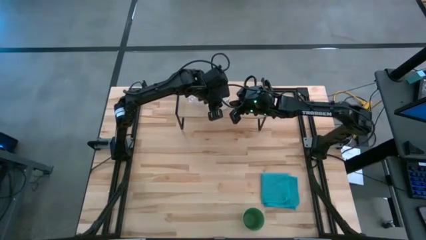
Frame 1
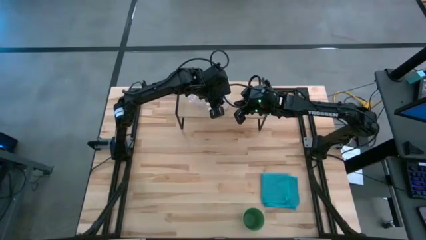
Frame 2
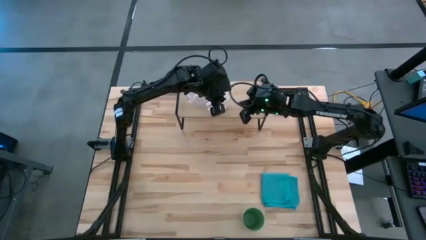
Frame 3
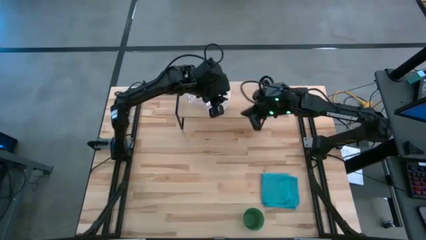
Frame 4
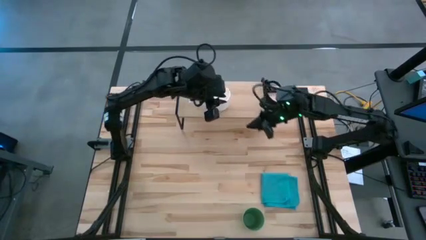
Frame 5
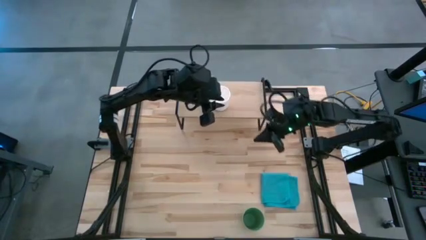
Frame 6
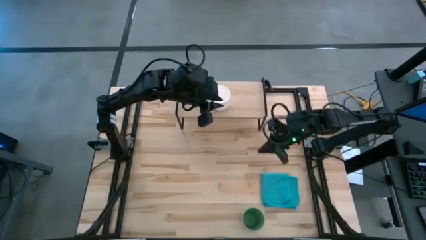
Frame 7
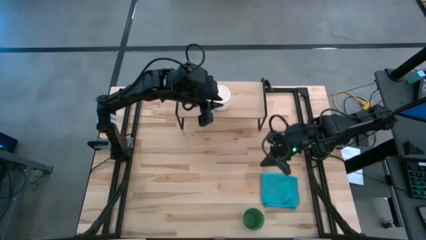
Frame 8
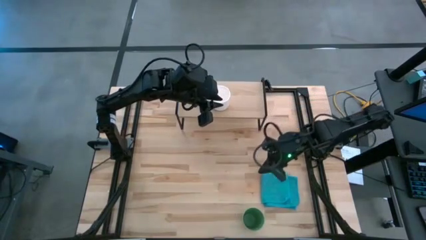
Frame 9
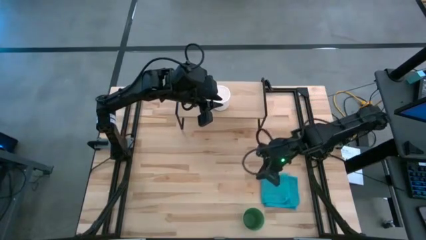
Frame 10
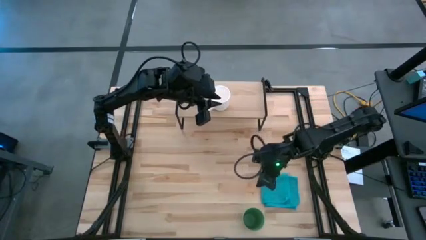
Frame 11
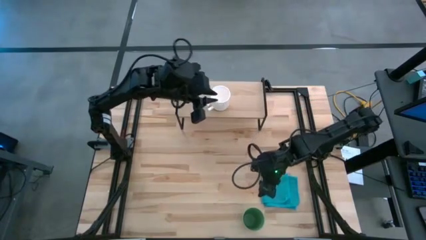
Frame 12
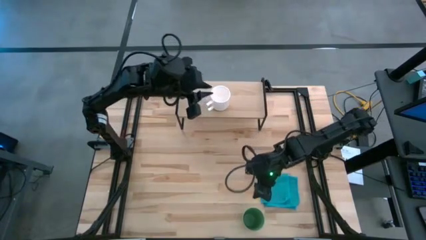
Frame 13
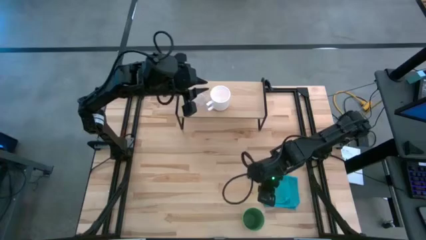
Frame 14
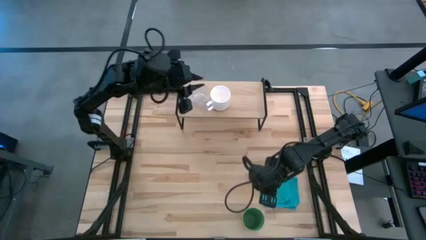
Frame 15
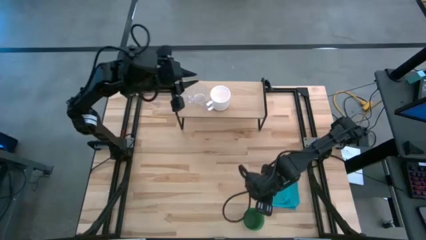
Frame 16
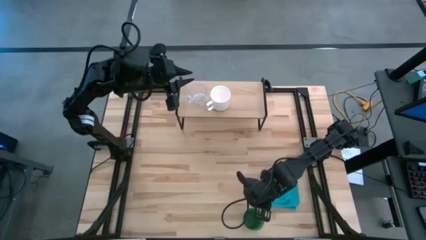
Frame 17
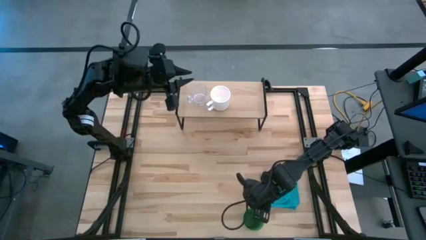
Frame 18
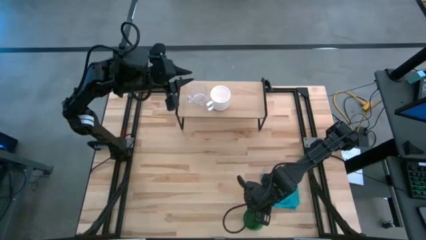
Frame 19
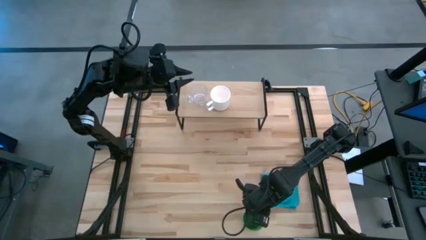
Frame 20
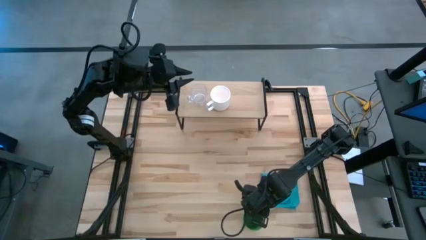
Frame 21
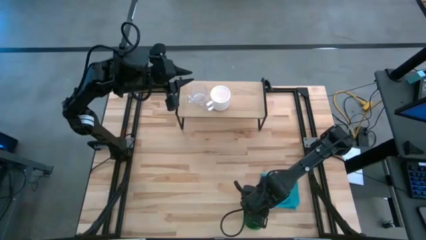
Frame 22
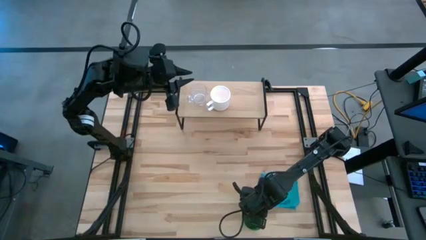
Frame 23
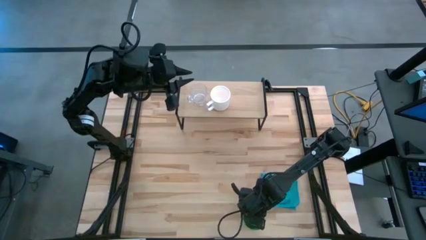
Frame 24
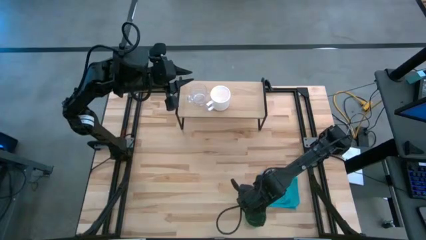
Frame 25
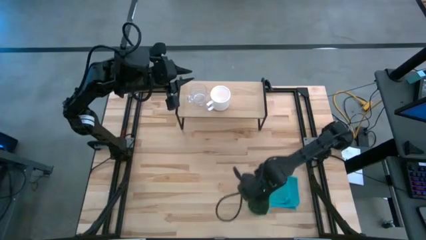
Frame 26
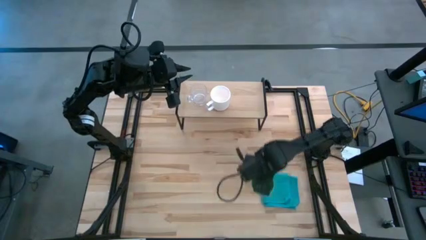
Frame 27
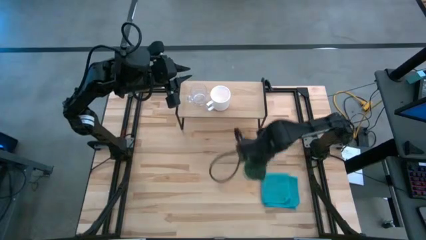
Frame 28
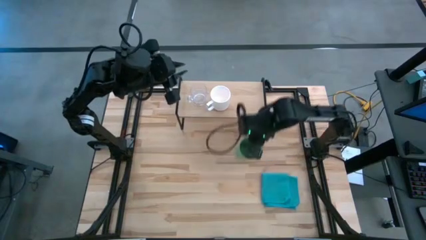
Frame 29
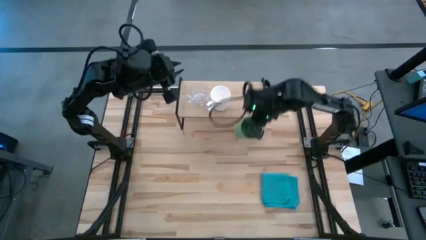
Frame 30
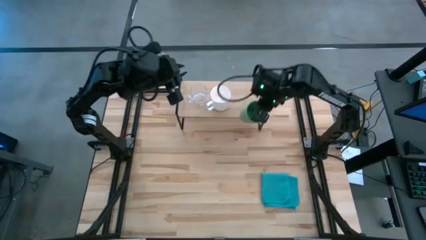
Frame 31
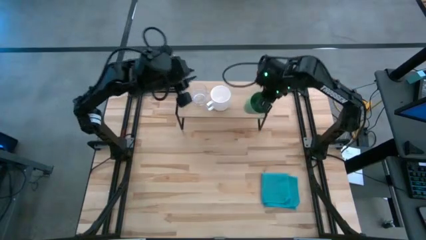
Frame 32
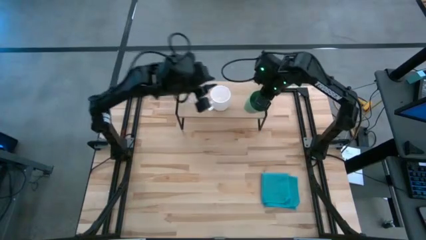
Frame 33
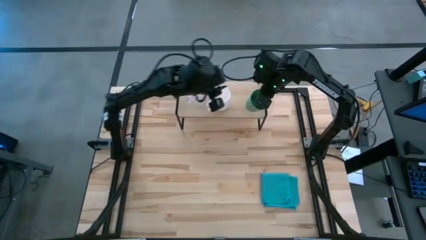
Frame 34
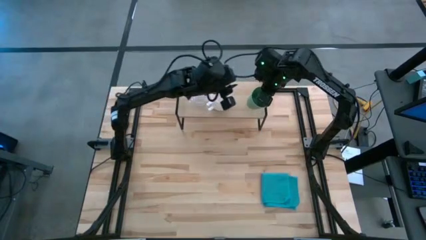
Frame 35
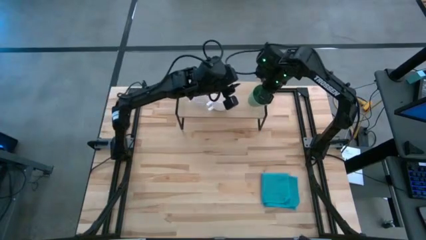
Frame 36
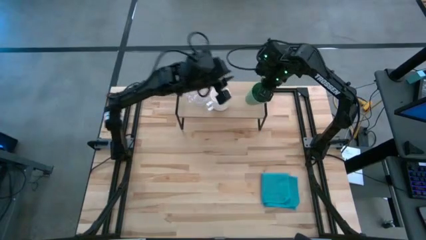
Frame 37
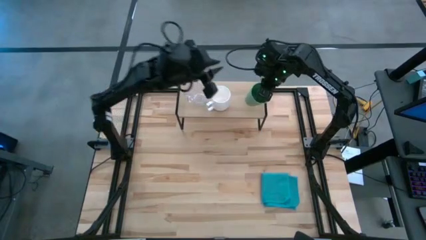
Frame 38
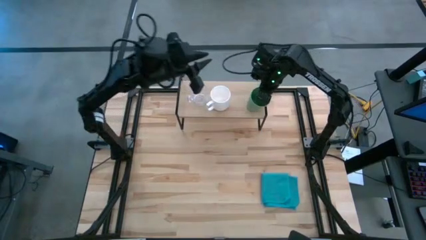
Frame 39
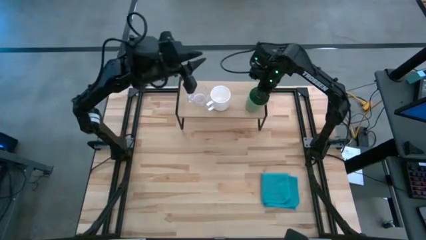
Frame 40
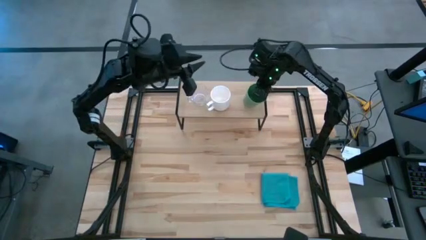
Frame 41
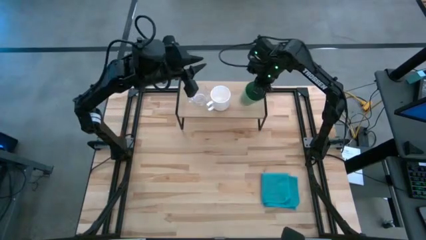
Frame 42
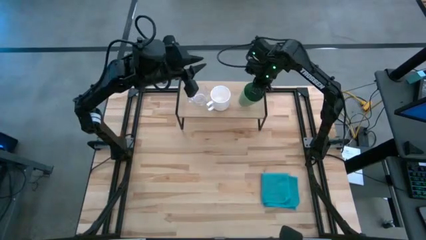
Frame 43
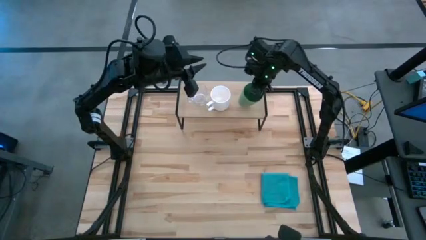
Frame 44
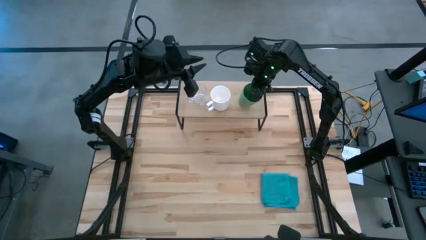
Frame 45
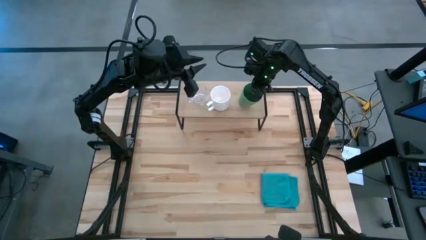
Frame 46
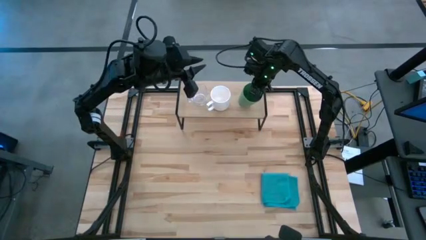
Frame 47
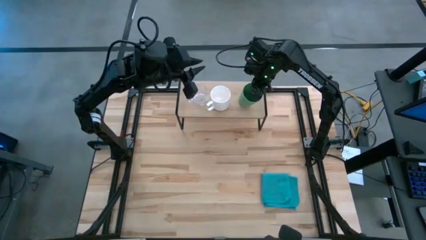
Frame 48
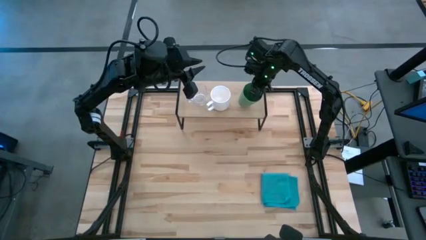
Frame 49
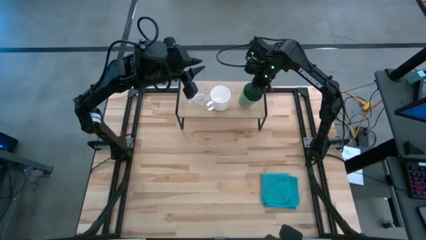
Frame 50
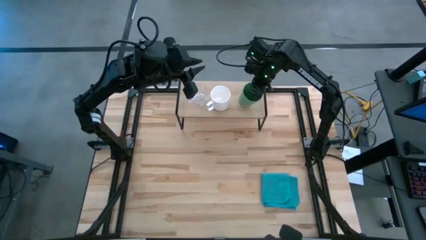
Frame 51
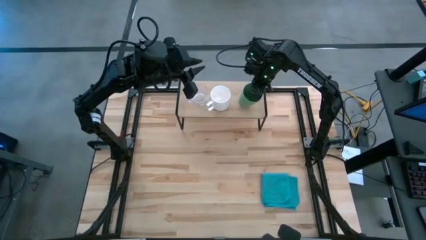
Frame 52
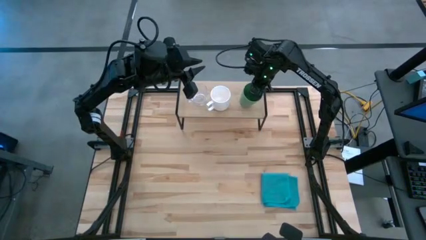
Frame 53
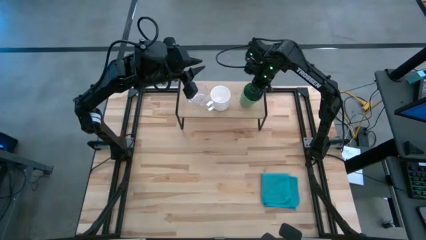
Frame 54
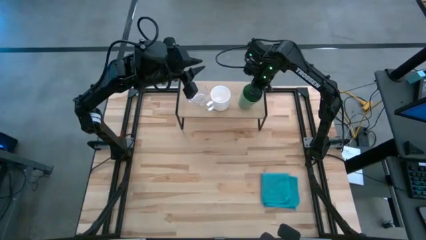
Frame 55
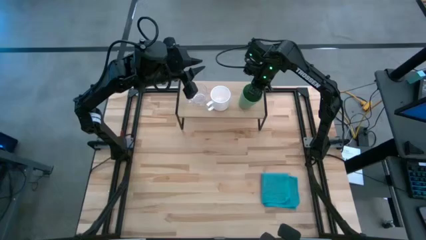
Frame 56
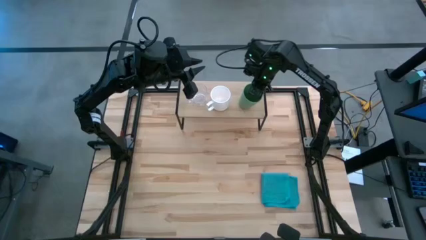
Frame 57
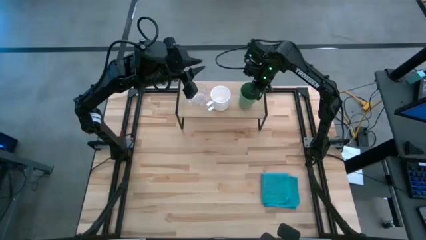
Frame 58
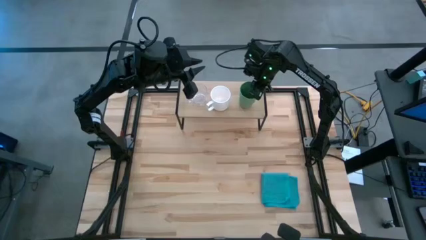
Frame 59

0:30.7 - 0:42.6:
Task: Stack small to large cups/mugs on shelf
Put the green cup on the shelf

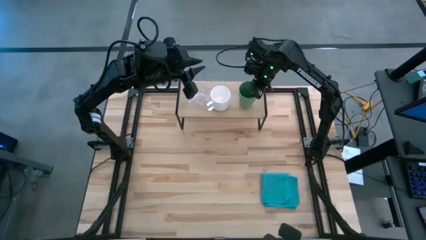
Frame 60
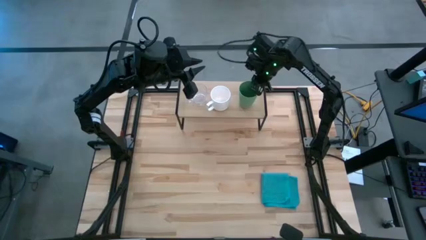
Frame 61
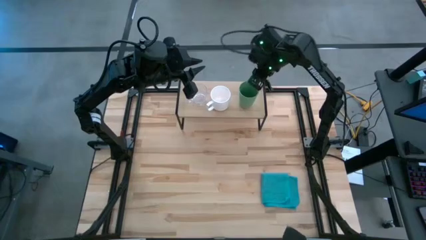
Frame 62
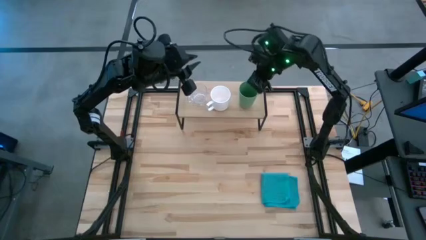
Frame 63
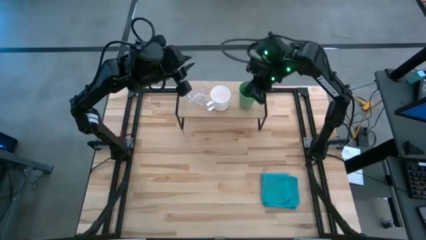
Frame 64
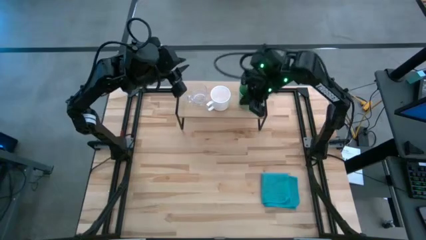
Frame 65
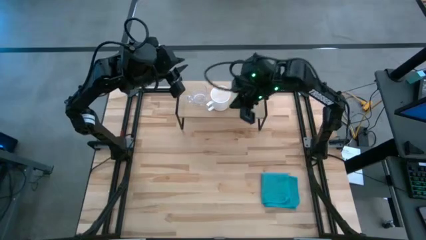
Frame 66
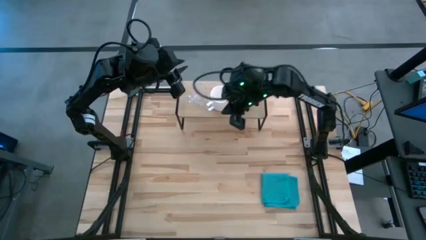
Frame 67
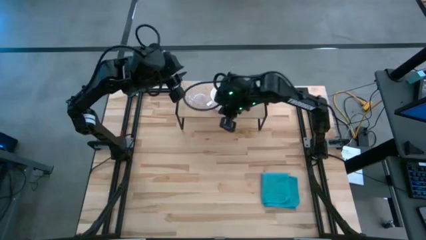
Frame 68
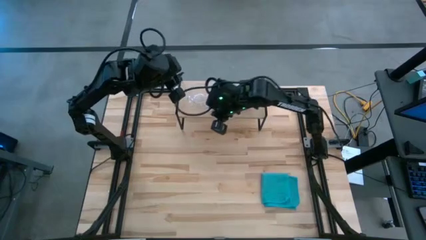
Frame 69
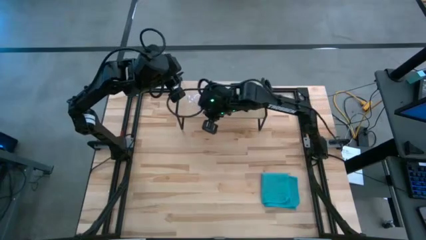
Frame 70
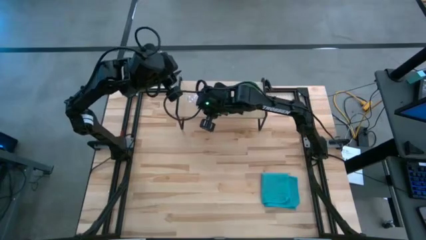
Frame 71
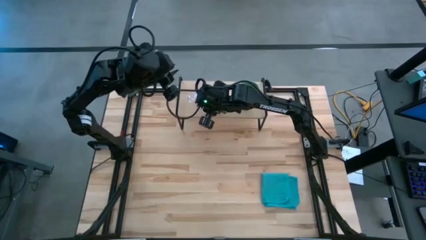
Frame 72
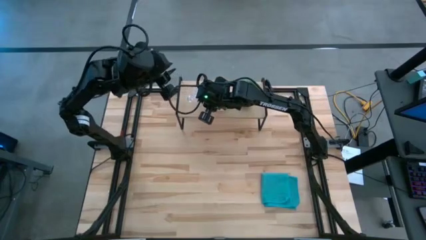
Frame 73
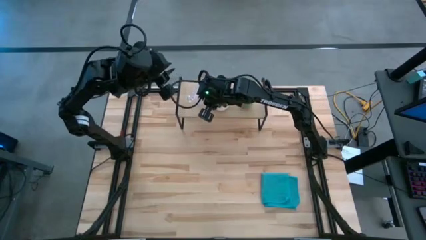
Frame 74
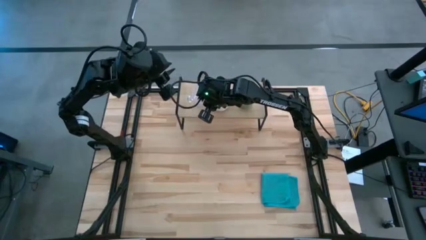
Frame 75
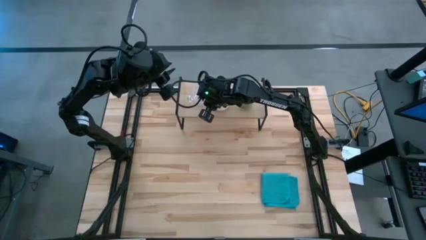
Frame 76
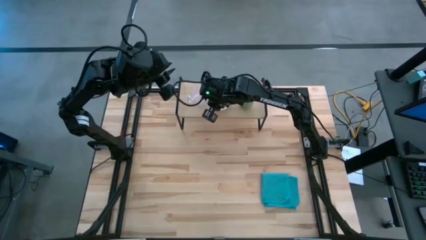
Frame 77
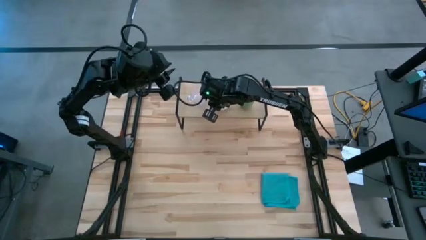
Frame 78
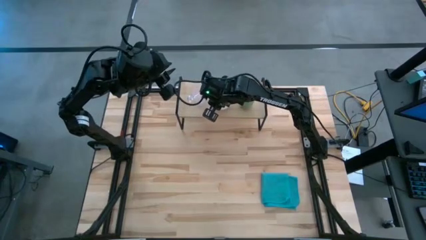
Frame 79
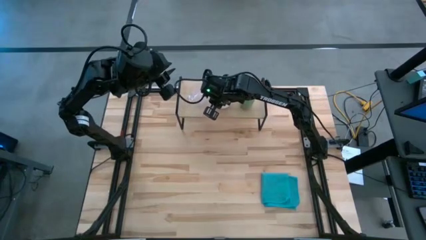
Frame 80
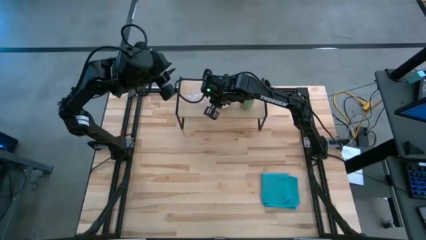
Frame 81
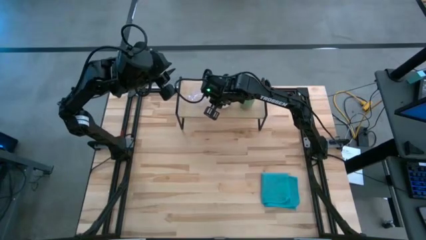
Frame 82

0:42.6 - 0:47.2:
Adjust the white mug on the shelf

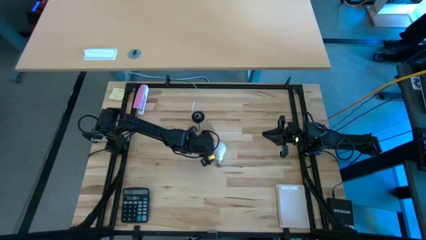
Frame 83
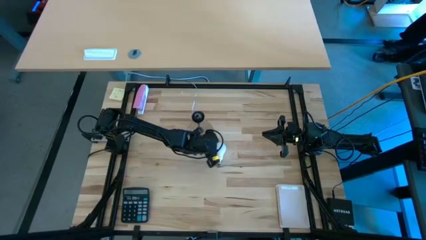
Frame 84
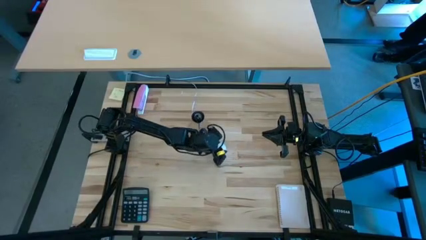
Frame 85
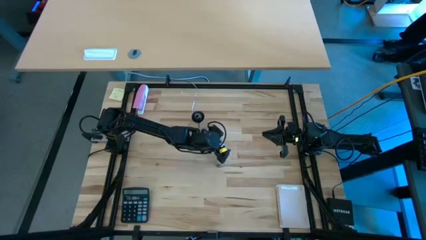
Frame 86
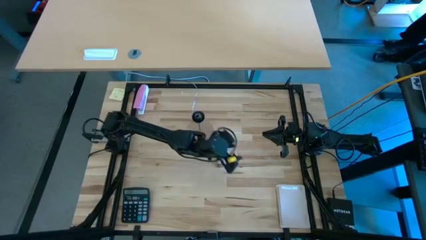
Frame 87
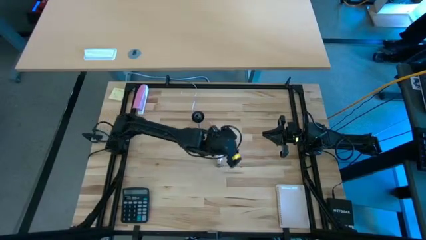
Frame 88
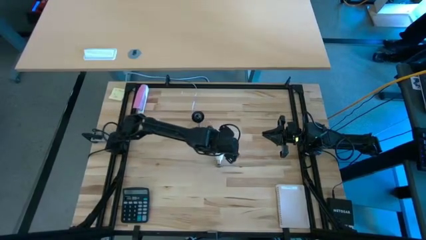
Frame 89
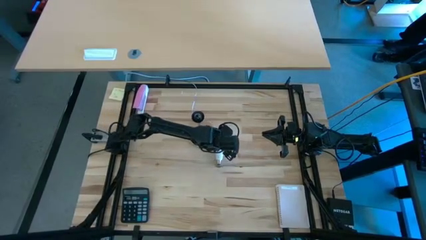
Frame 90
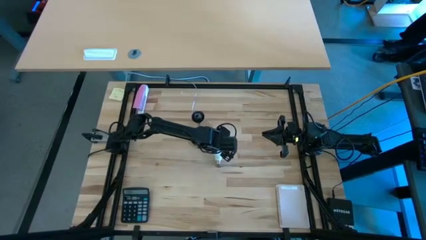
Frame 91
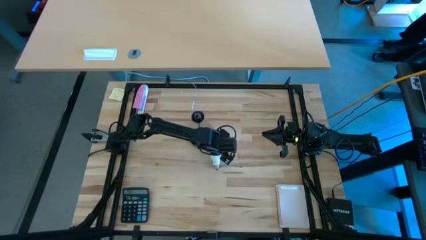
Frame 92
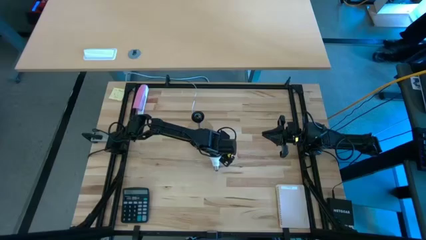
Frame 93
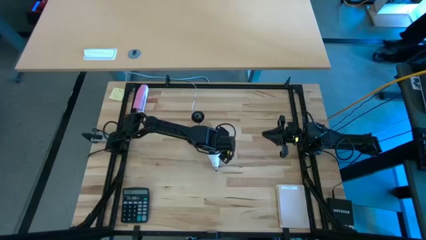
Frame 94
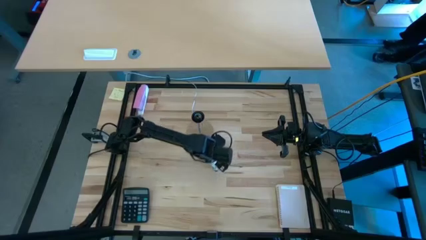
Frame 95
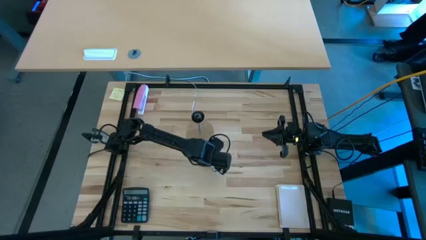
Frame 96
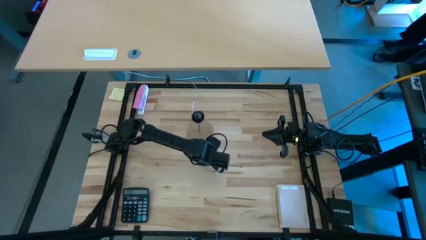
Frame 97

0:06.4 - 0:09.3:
Task: Screw lightbulb
Insert the white lightbulb into the brown lamp
